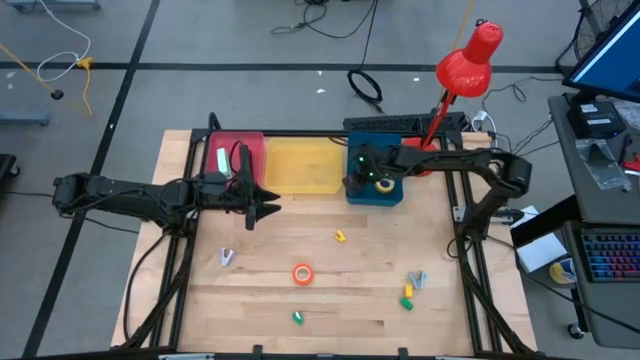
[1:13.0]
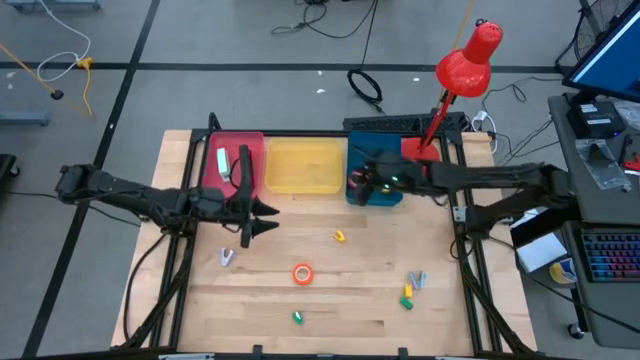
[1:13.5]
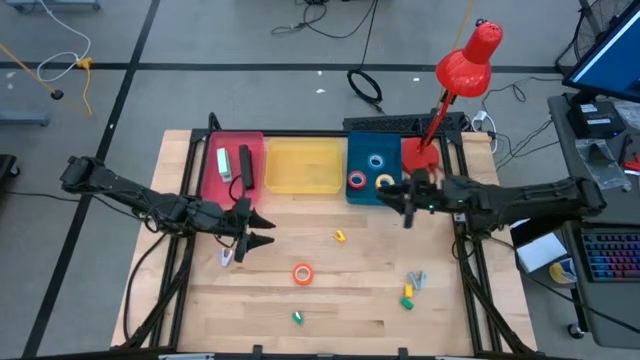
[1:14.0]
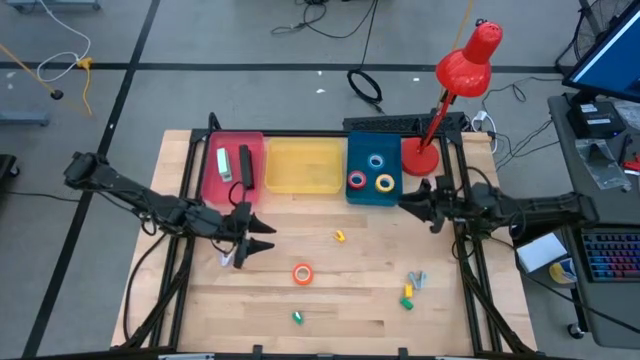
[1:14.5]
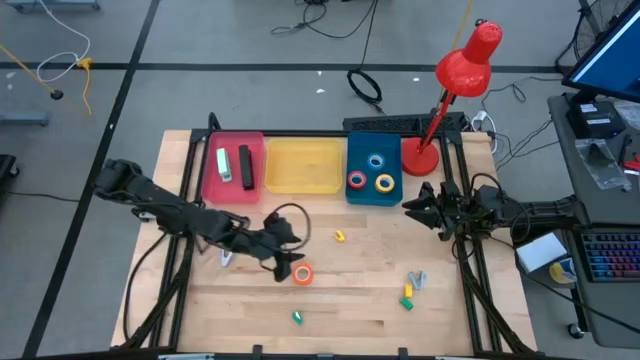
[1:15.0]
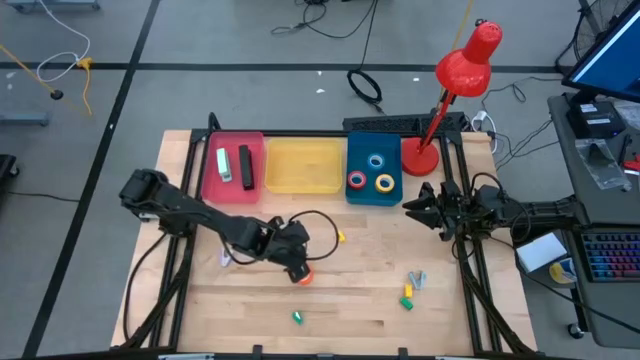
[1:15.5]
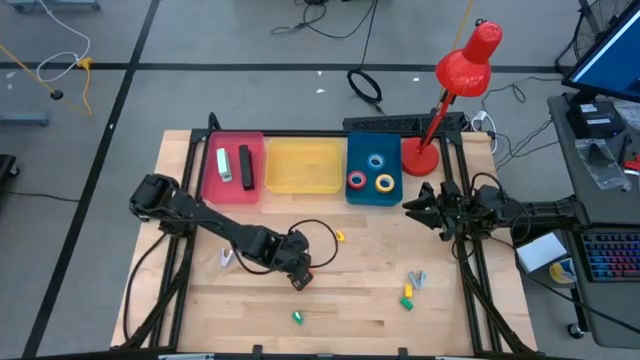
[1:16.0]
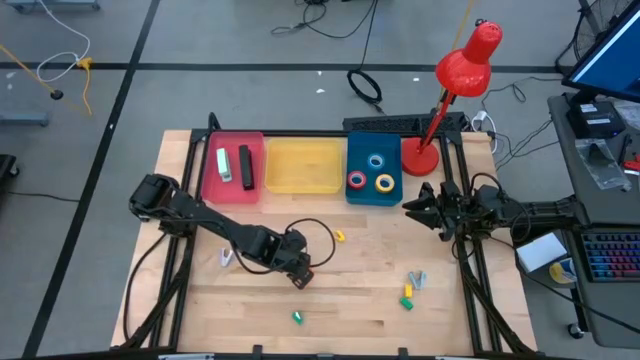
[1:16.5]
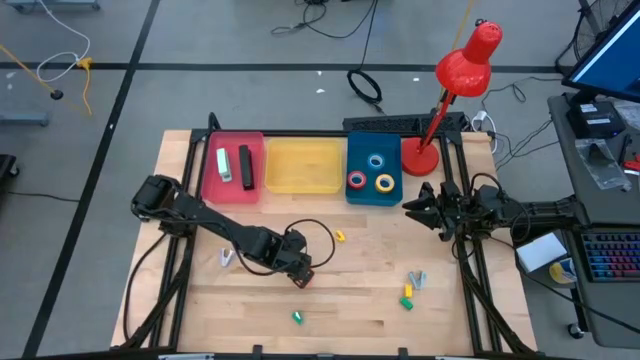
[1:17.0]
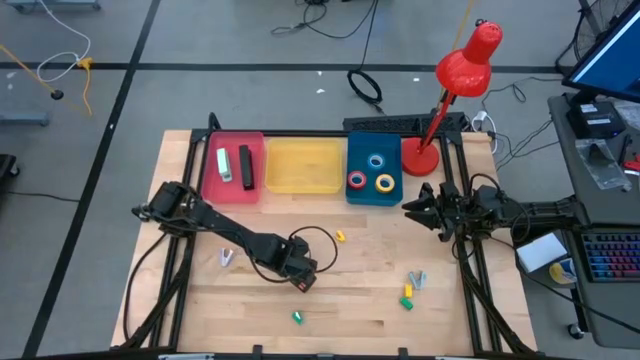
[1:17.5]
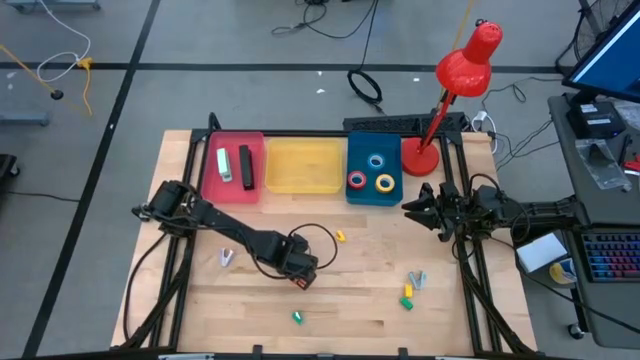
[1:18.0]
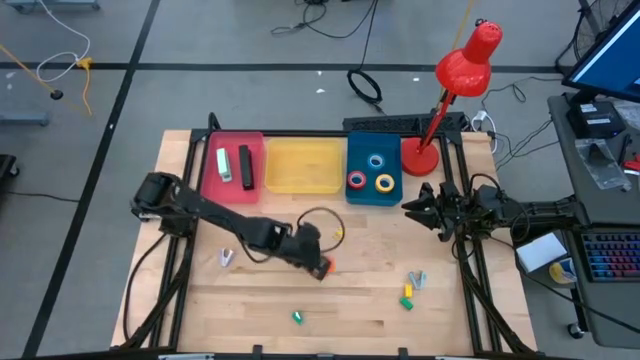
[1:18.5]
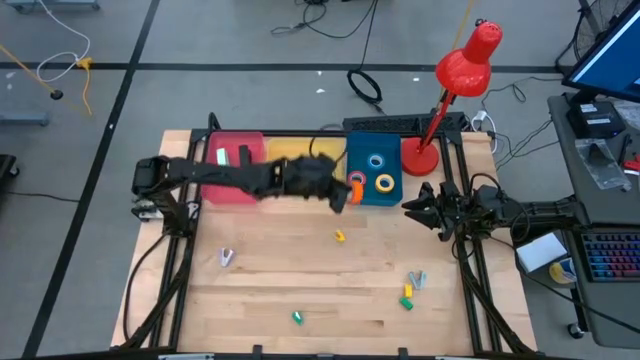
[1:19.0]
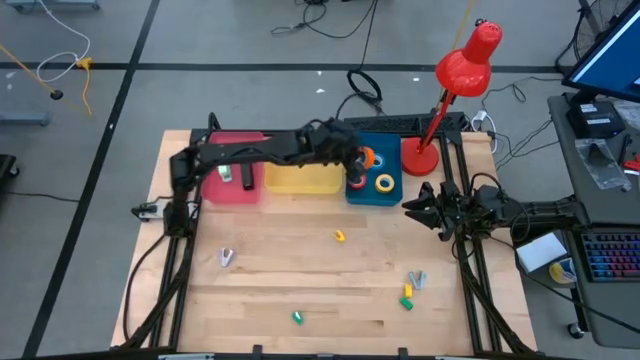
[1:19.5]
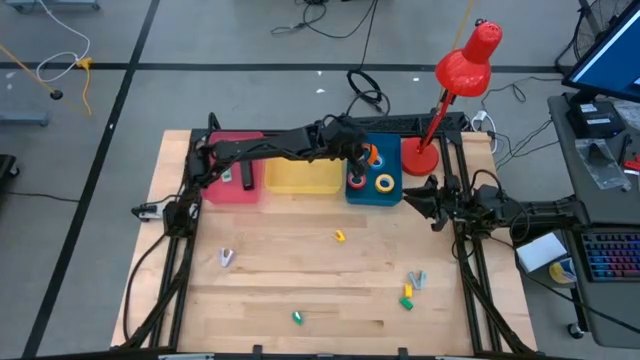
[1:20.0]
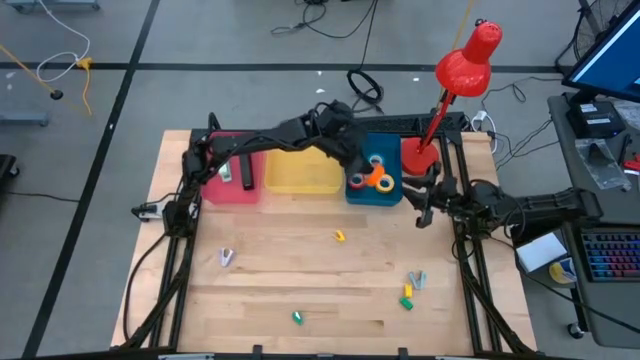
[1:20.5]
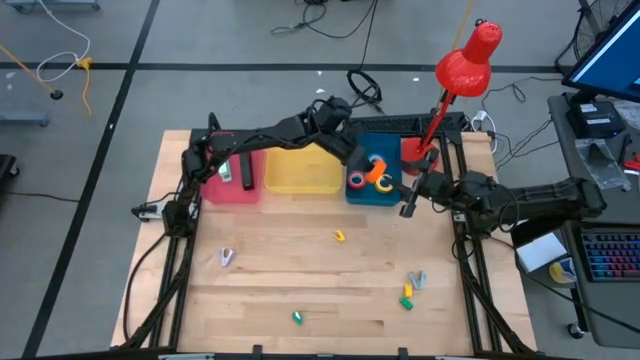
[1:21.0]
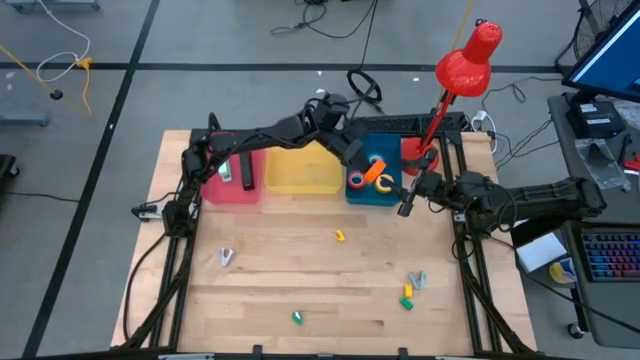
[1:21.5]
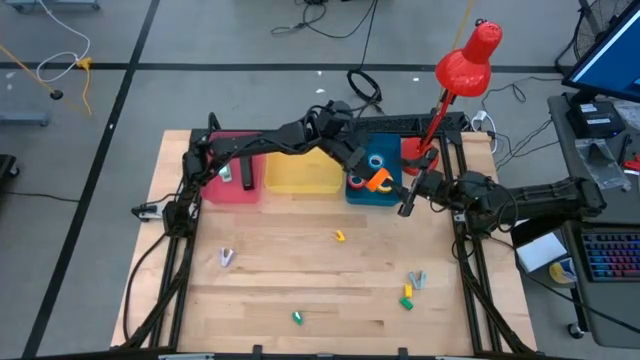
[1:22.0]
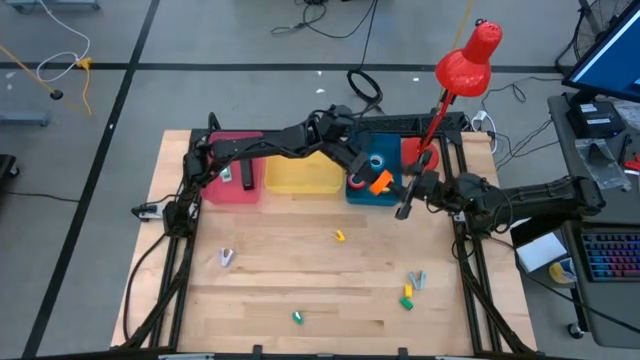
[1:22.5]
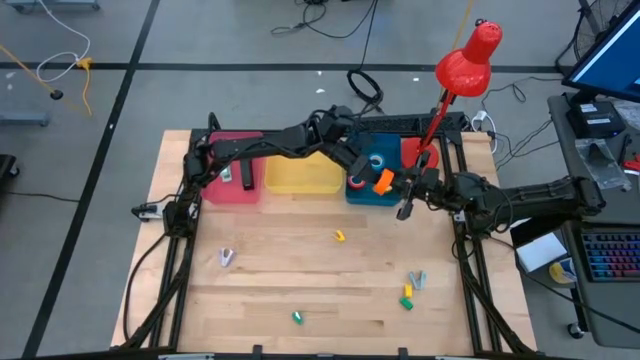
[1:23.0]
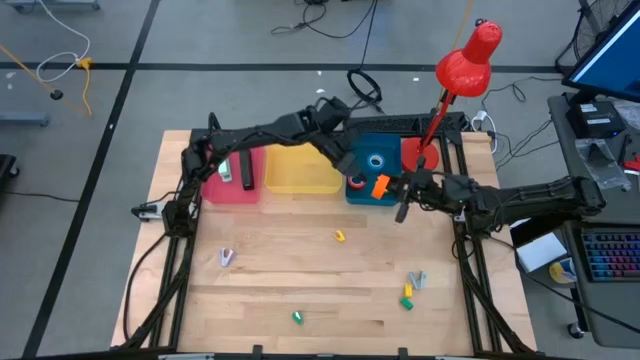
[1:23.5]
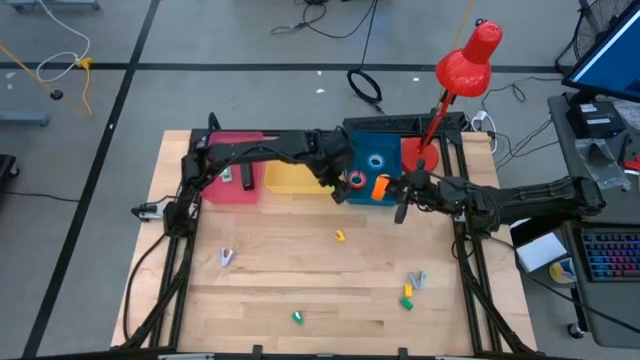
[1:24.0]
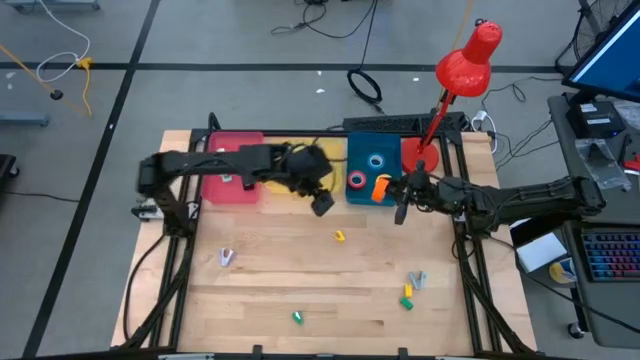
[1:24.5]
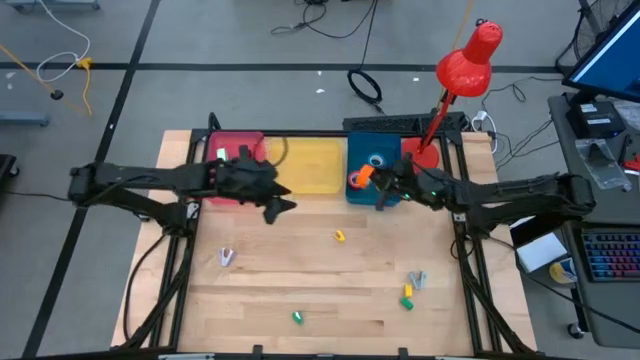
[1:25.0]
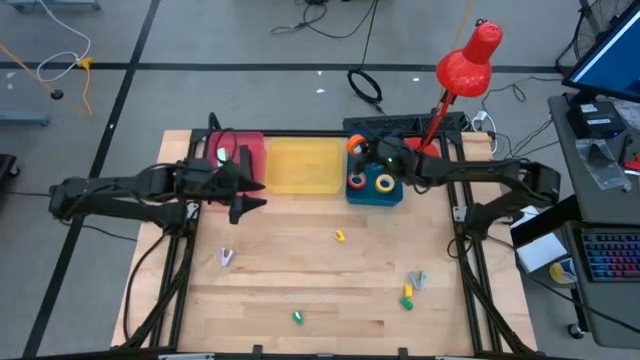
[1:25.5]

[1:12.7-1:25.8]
Task: Pick and place Stapler, Stapler remover, tape
Put the orange tape into the blue bin

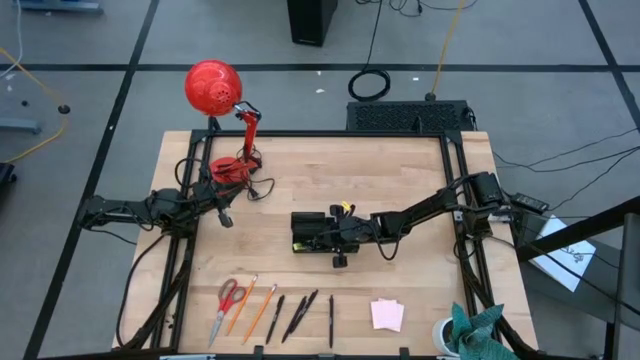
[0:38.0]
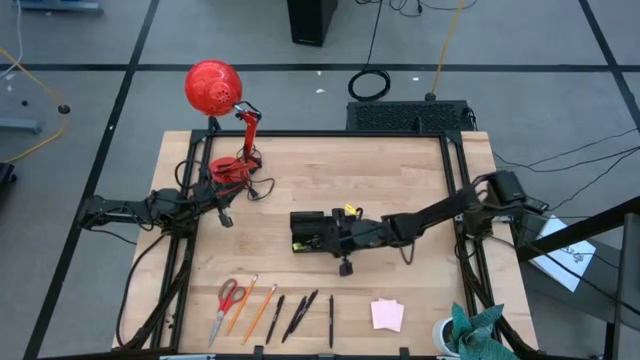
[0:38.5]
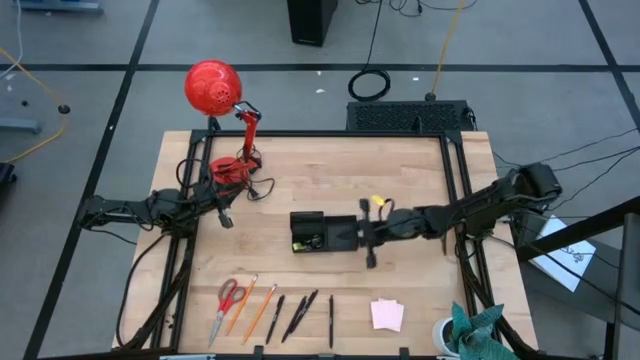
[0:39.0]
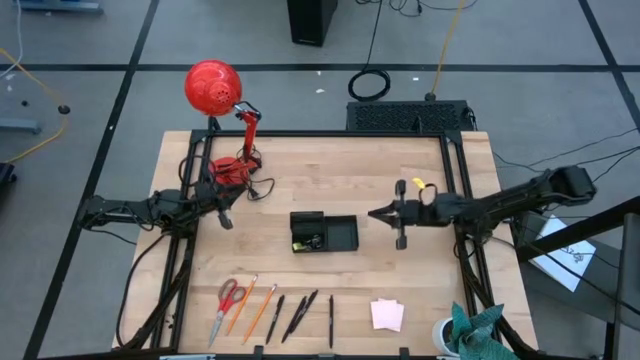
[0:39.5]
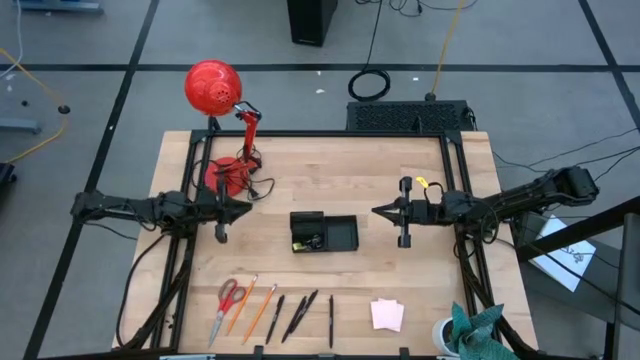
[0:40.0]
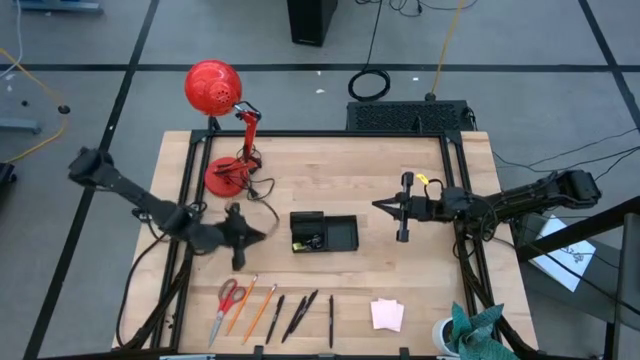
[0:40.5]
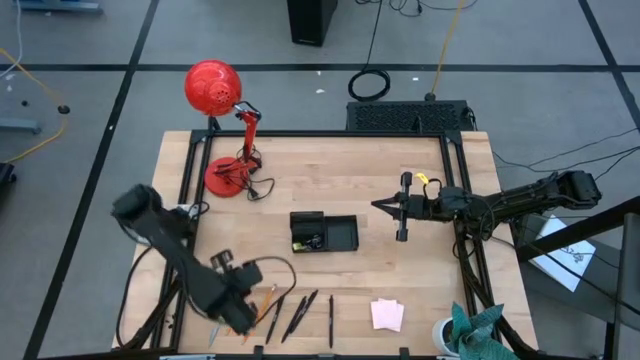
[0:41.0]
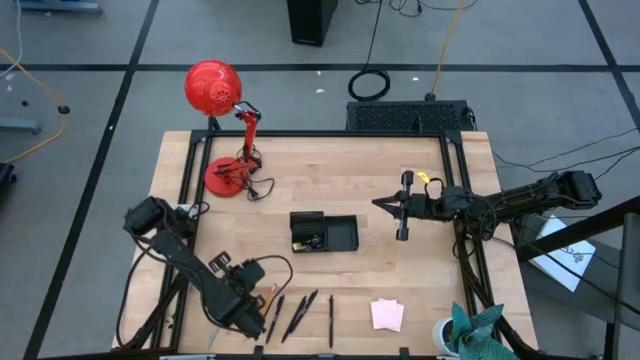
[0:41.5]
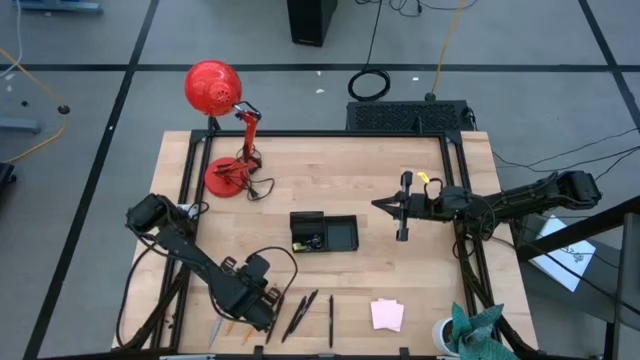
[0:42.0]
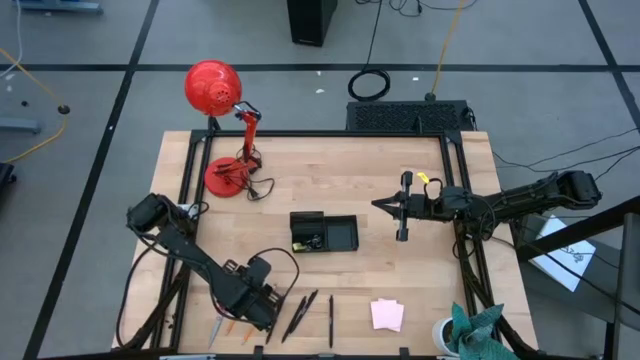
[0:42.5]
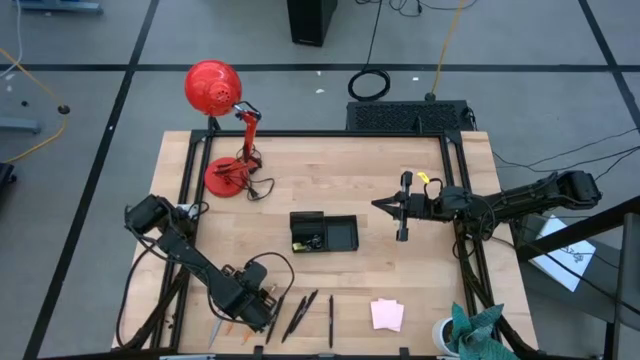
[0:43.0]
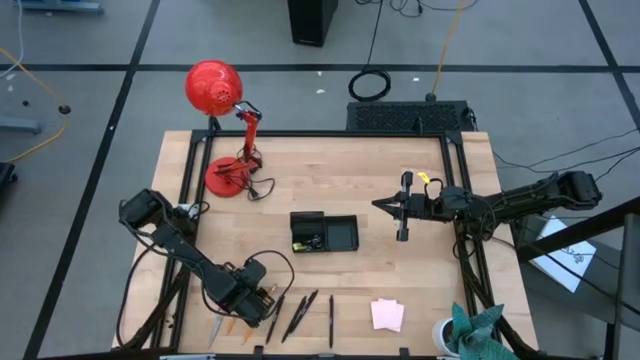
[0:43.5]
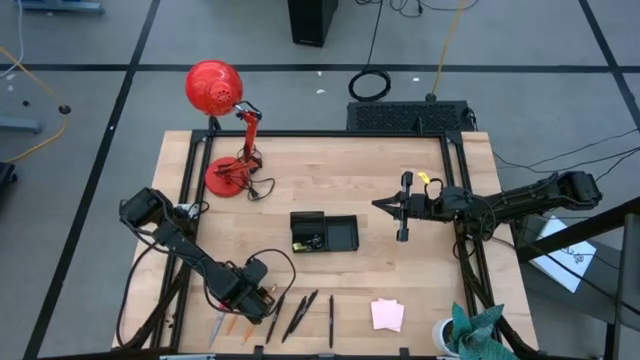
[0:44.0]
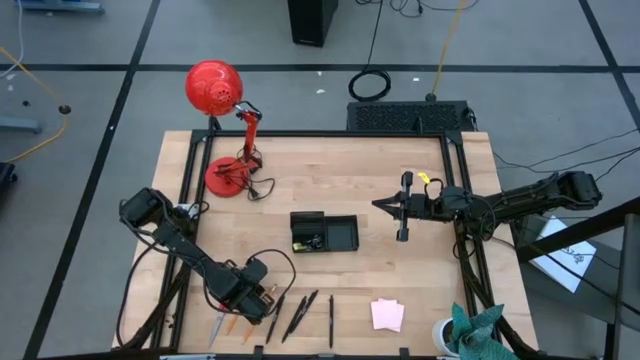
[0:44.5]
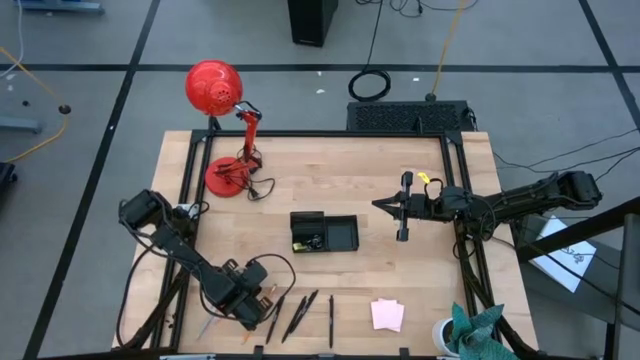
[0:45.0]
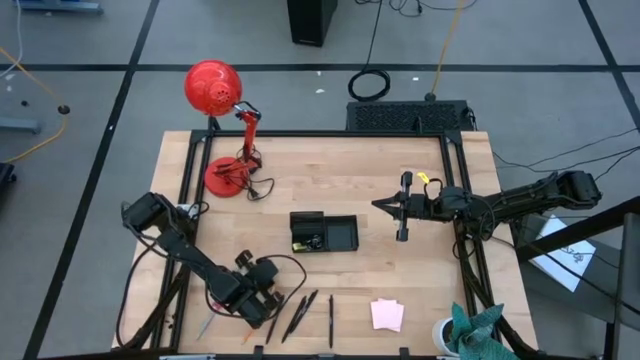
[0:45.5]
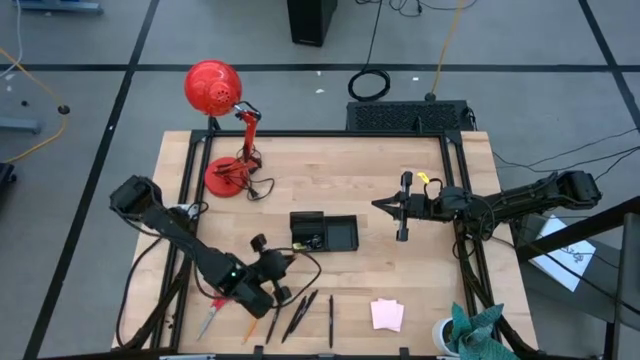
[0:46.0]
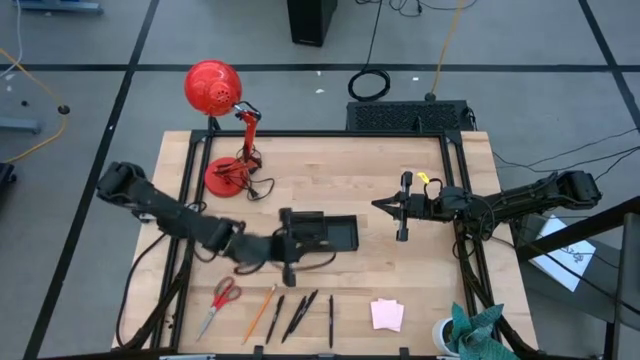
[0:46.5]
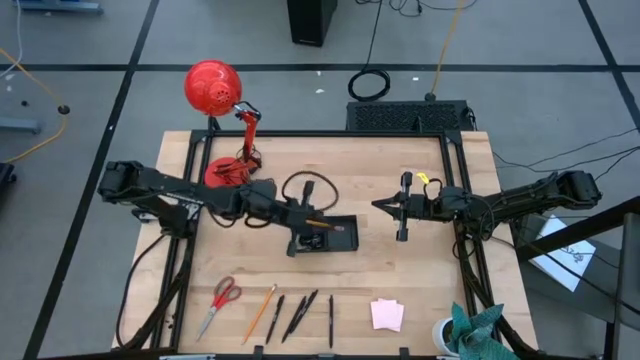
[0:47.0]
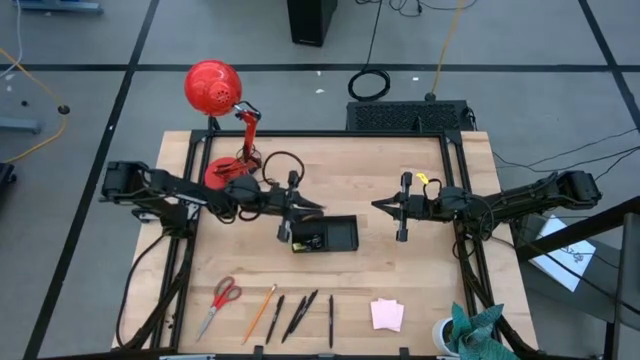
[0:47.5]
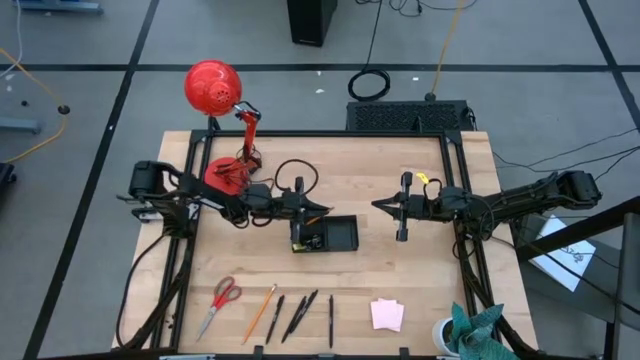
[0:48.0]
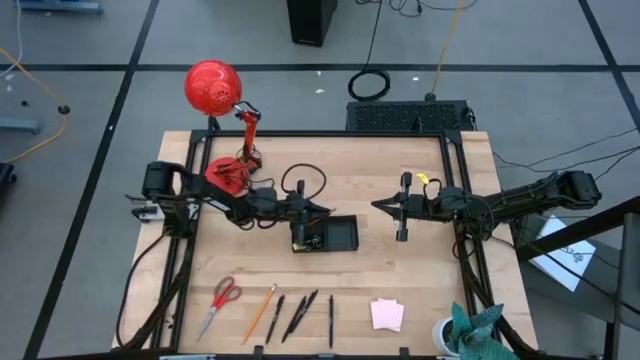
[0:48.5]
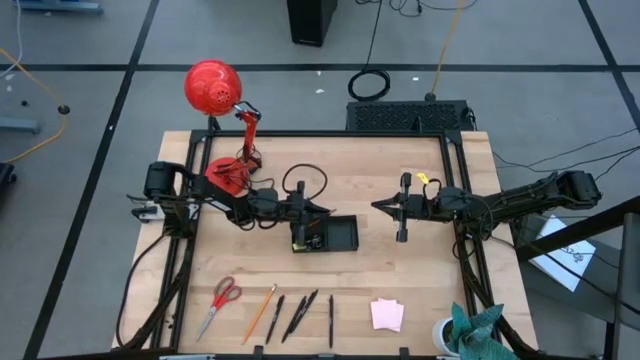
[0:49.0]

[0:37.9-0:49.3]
Task: Pick and place office supplies into organizer
Put the left pencil into the desk organizer
